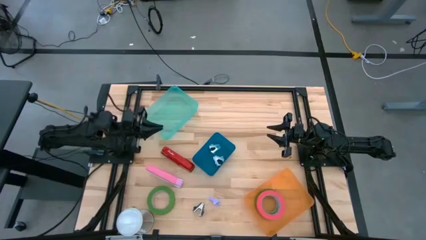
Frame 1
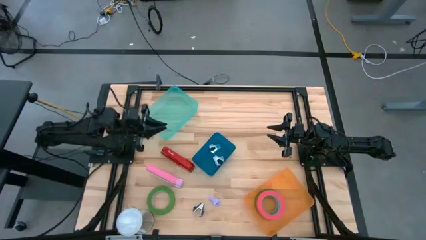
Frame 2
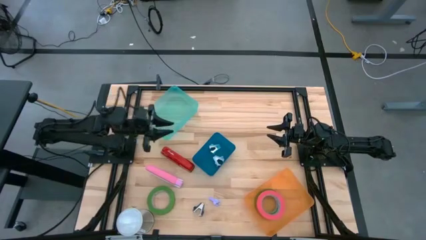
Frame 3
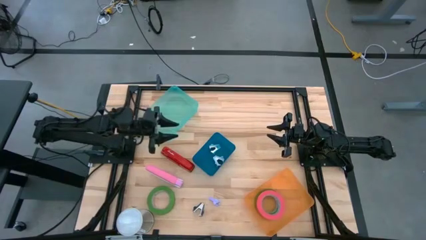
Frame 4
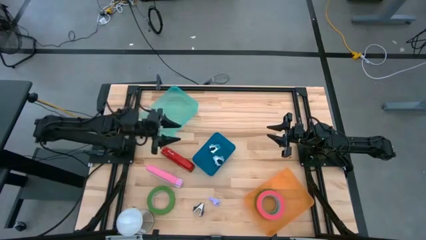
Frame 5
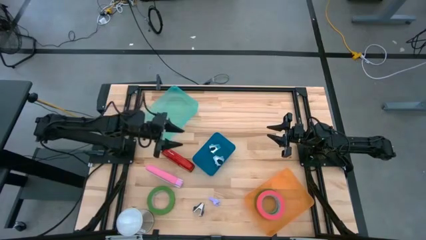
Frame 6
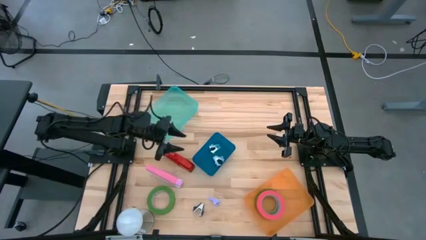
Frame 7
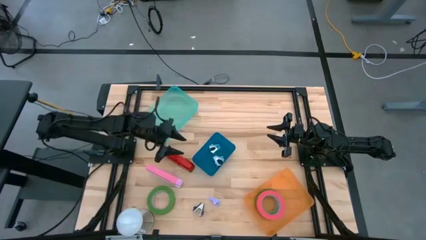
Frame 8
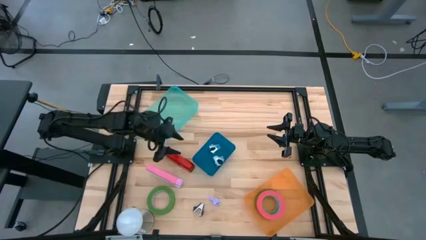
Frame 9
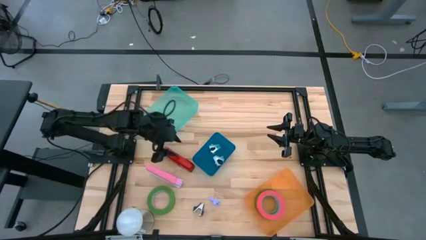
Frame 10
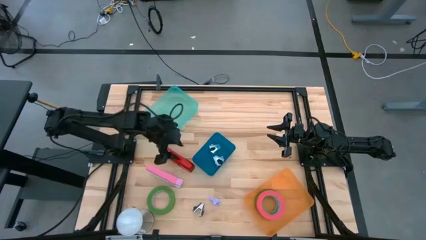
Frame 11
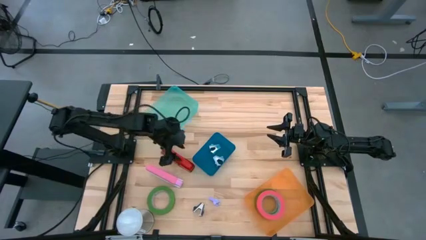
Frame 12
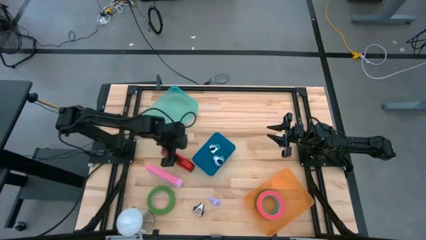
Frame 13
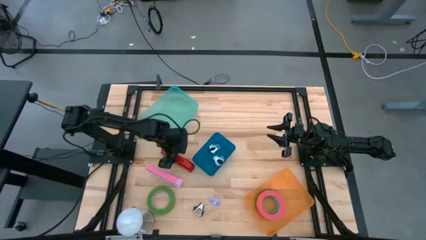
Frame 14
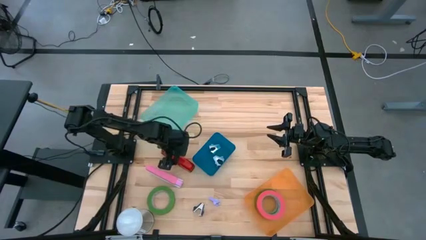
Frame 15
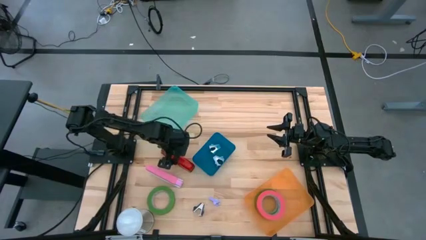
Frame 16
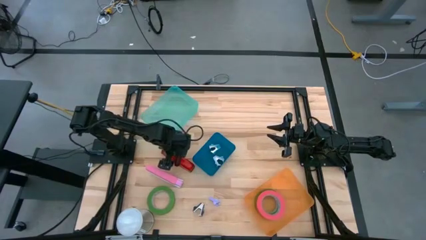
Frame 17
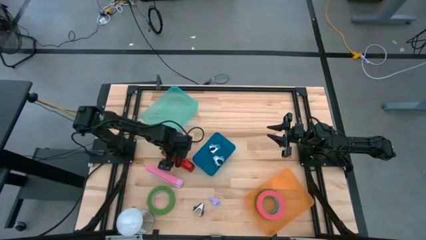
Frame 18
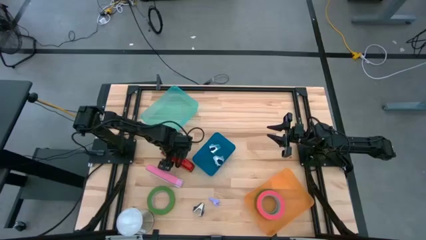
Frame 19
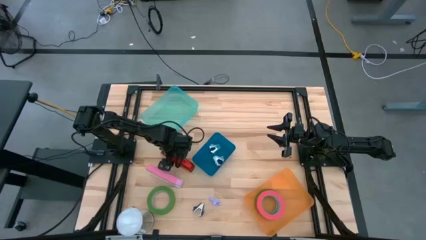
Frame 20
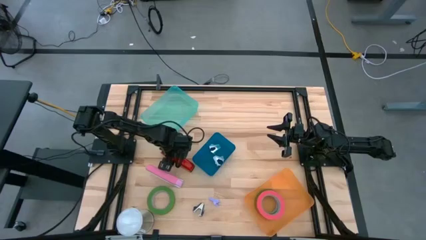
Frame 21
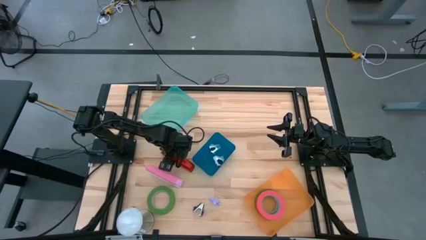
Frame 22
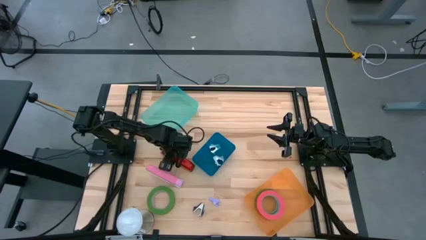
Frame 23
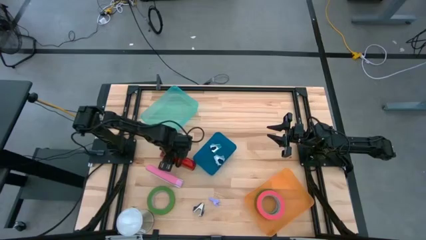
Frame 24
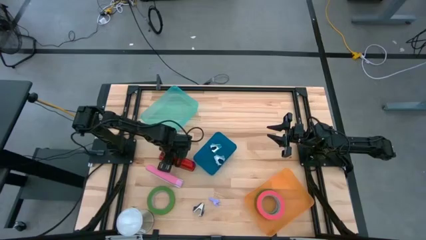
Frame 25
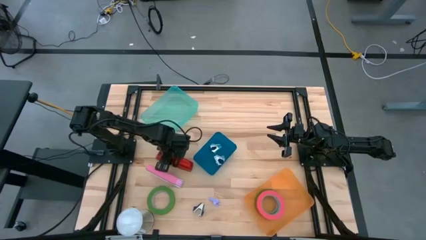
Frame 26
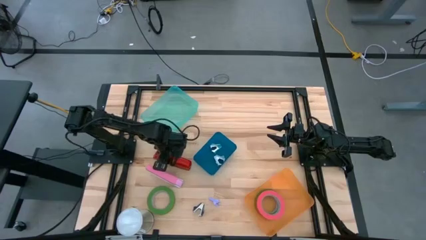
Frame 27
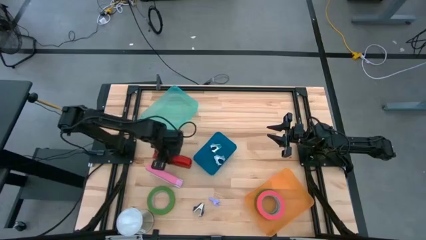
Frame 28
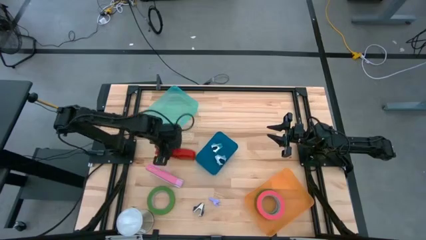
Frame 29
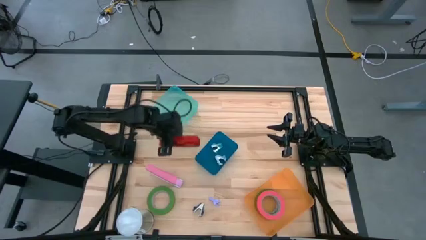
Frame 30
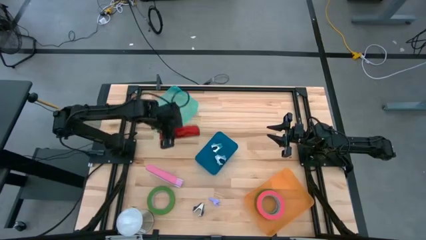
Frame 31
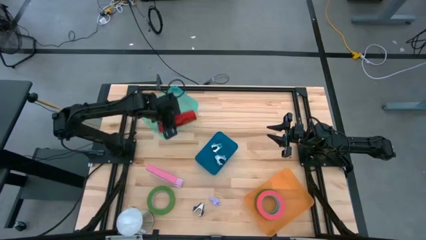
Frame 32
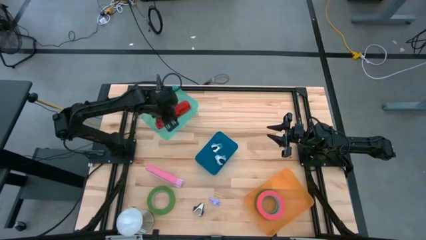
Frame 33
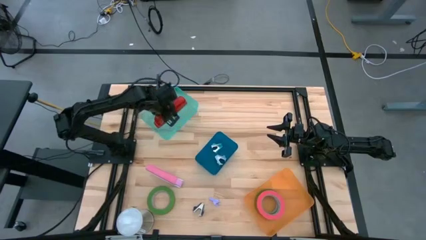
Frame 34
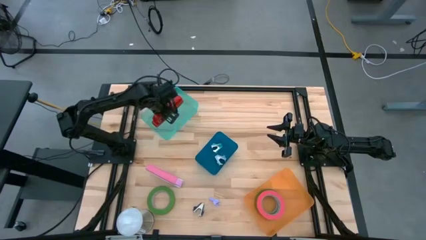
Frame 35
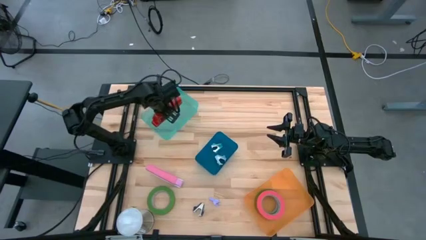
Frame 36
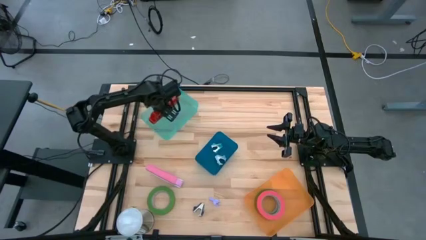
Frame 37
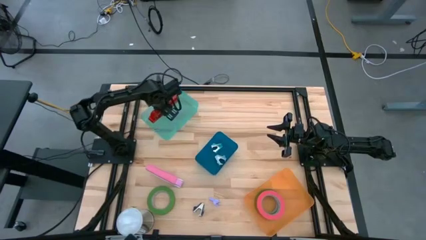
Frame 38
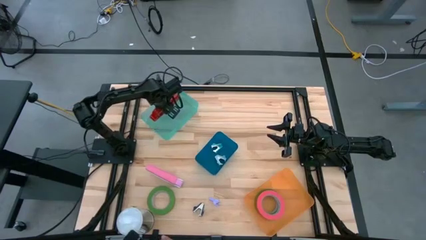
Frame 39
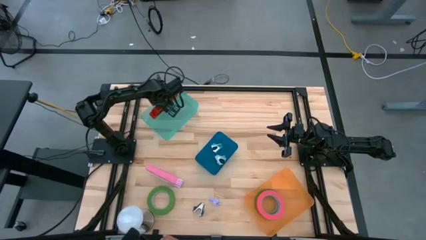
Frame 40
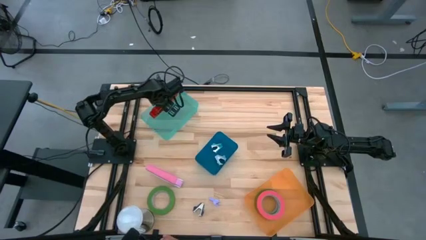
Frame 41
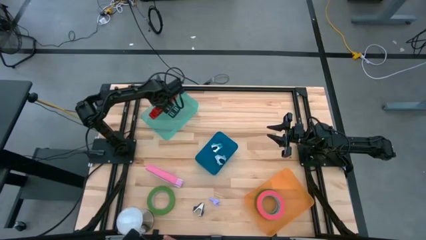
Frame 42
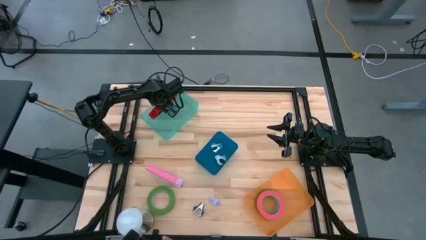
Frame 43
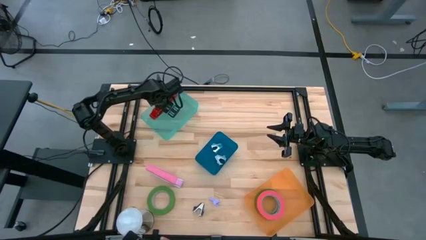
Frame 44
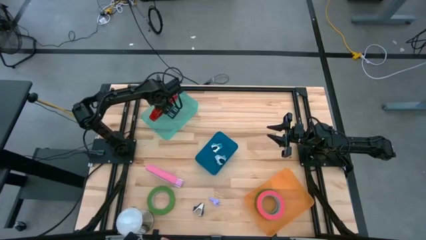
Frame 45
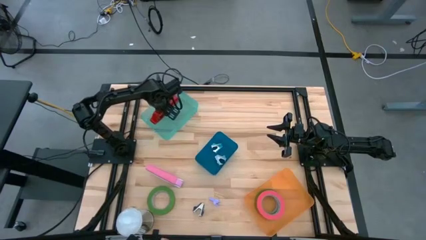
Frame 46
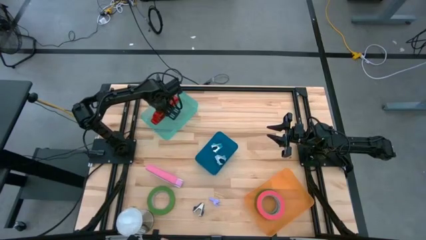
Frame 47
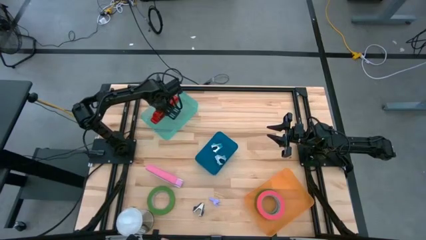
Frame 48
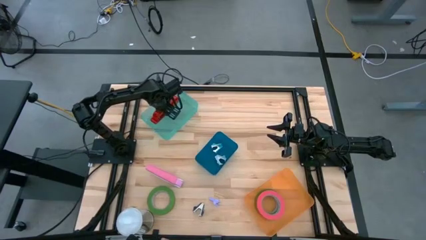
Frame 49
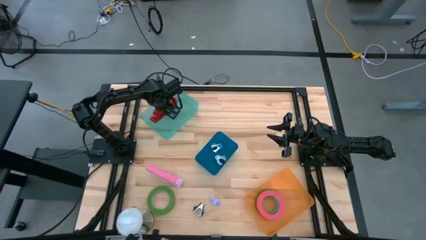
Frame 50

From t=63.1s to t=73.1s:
Task: Pick and place Stapler, Stapler remover, tape
Put the red stapler into the green bin

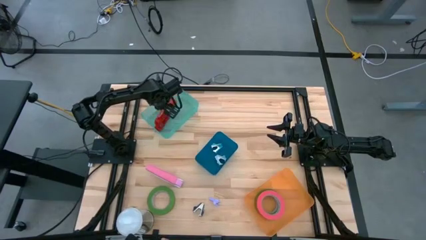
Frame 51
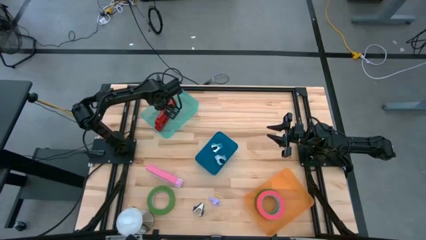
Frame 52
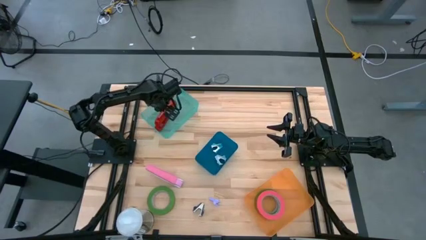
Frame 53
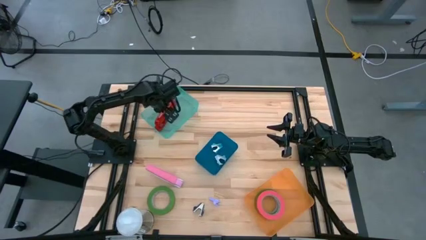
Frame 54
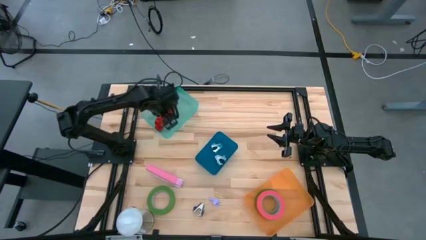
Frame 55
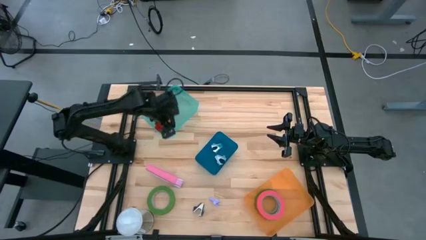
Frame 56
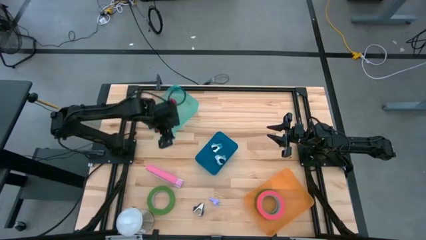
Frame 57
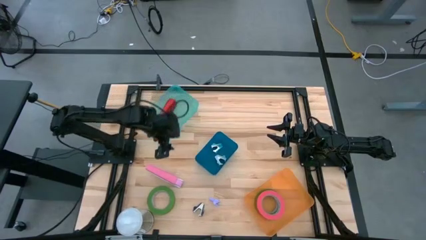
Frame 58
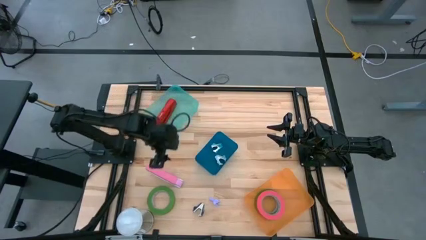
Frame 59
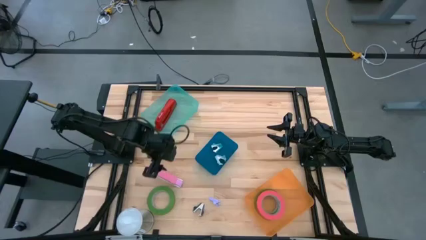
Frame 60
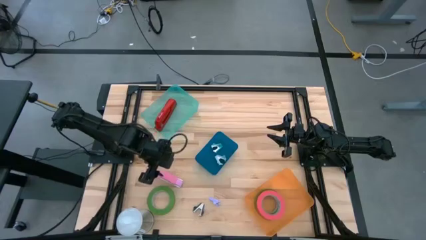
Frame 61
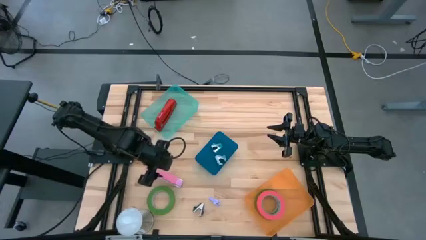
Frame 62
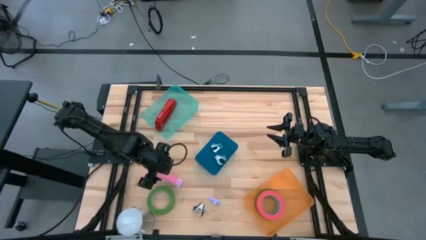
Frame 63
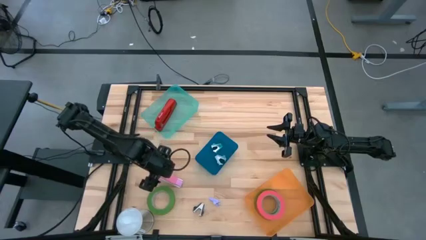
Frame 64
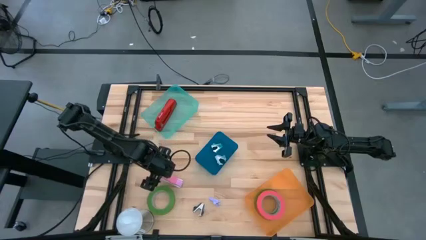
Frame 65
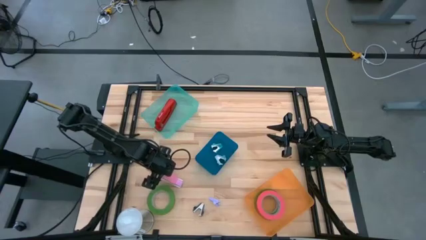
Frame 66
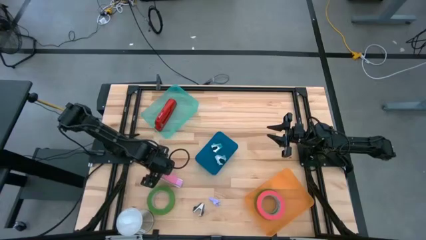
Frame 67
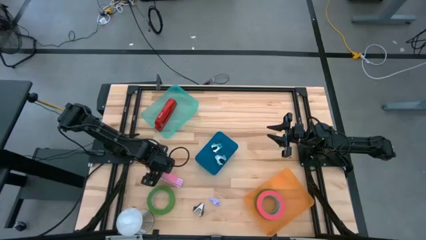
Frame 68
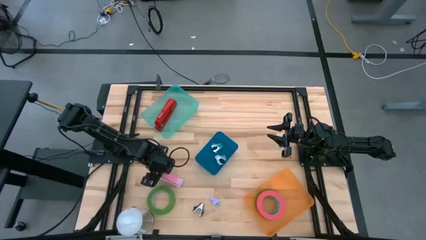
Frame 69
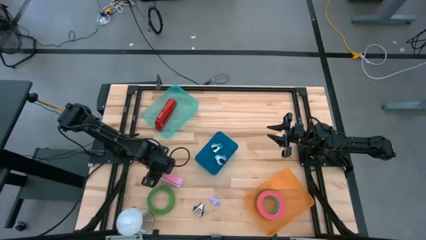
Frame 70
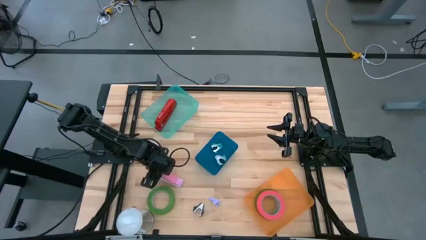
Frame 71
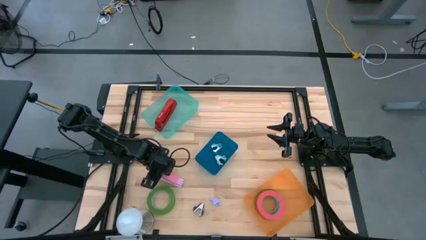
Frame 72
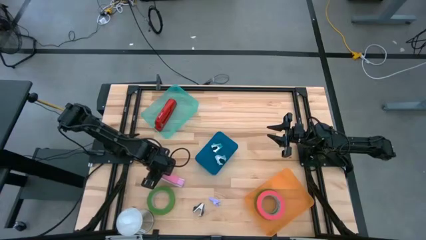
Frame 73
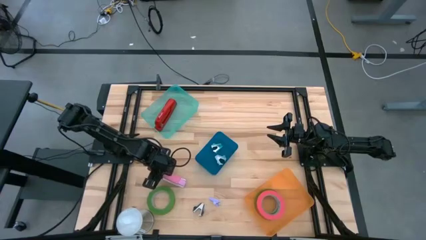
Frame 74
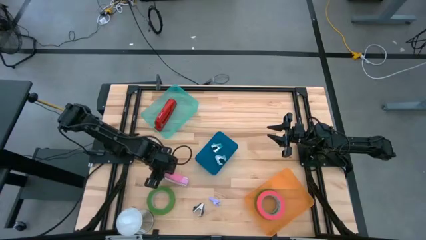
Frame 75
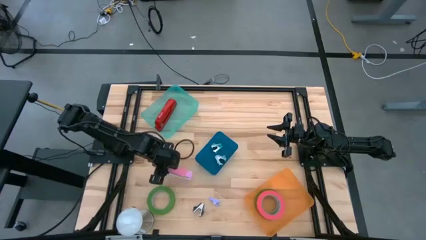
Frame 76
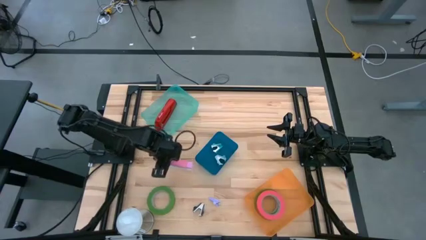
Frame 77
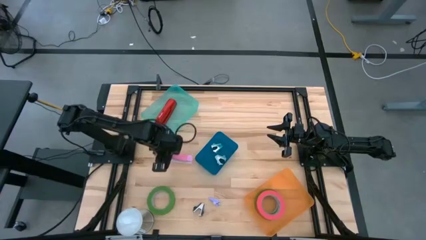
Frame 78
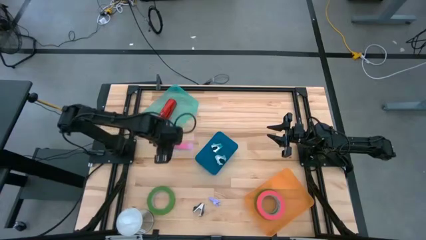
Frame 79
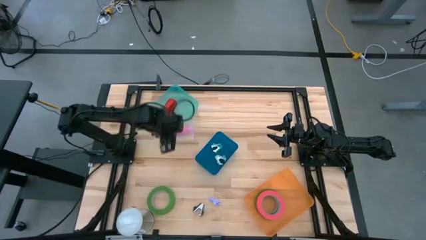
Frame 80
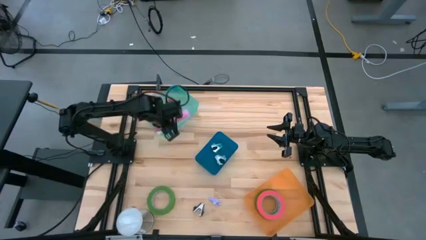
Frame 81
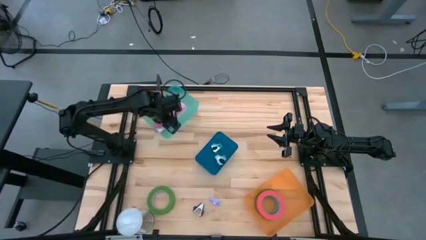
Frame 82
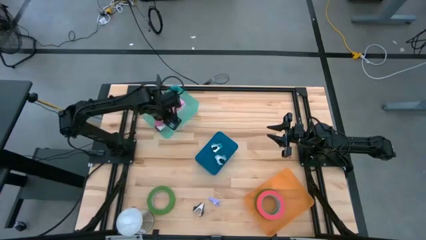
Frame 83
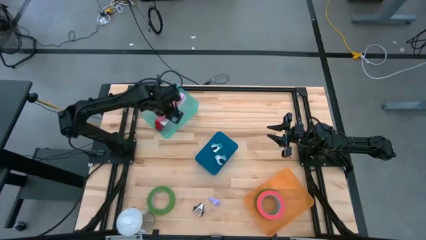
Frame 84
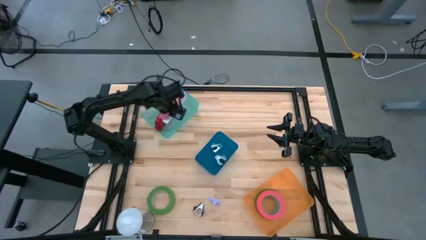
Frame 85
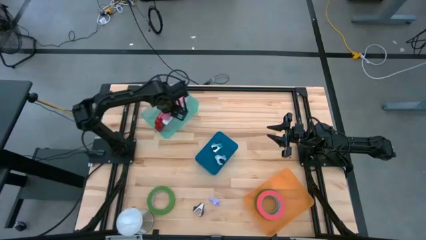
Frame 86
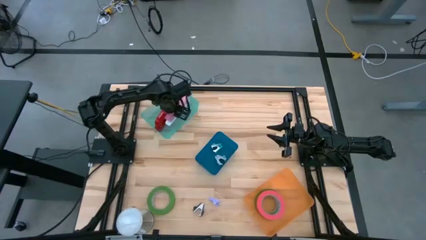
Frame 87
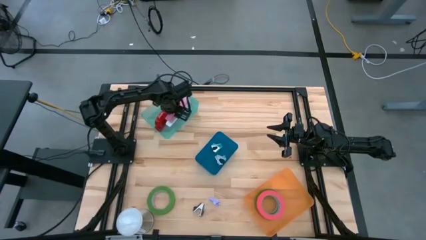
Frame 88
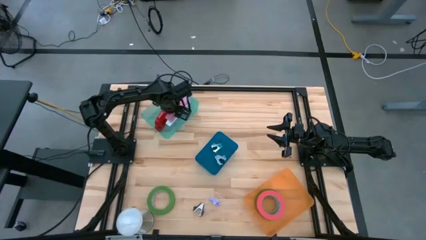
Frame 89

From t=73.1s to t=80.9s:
Put the pink stapler into the green bin
